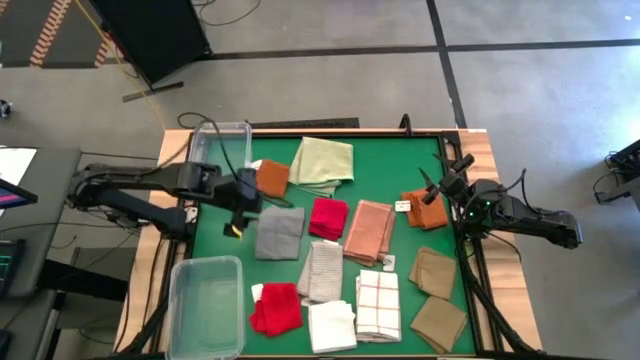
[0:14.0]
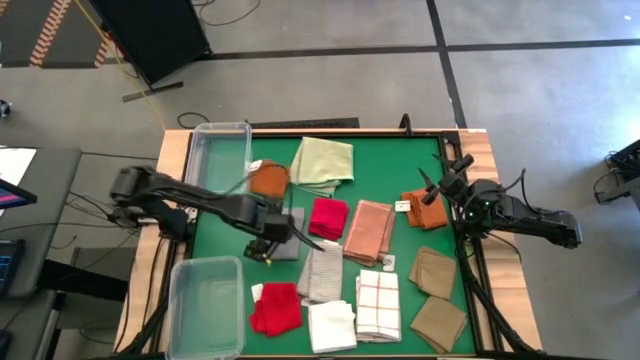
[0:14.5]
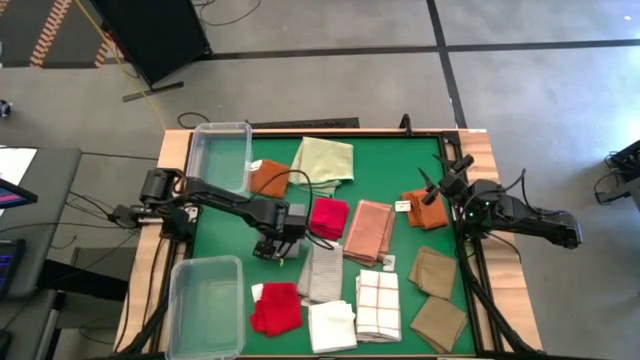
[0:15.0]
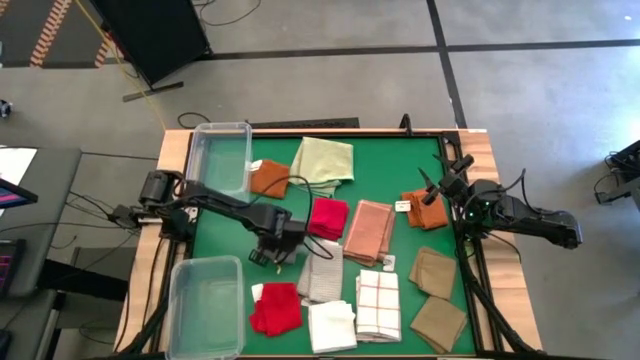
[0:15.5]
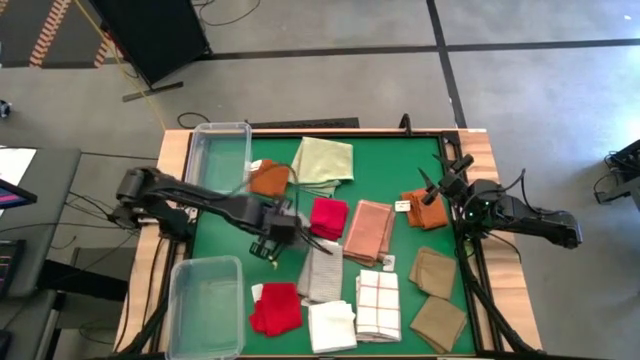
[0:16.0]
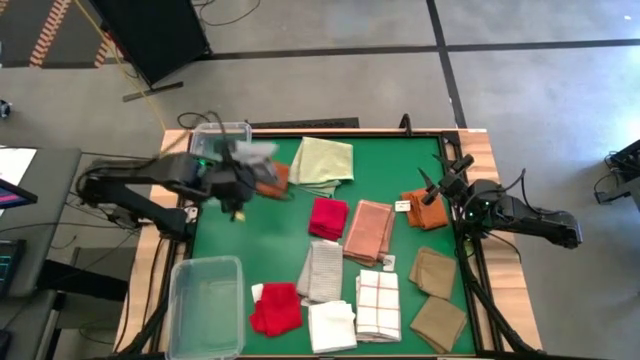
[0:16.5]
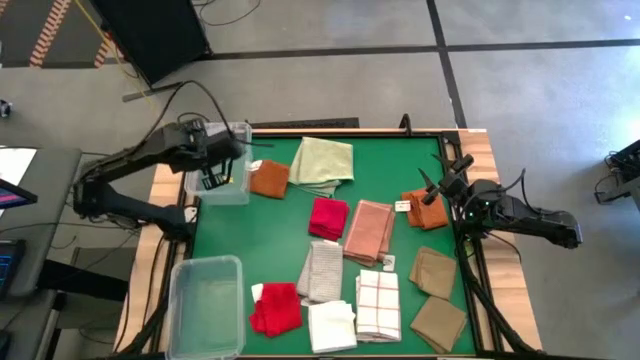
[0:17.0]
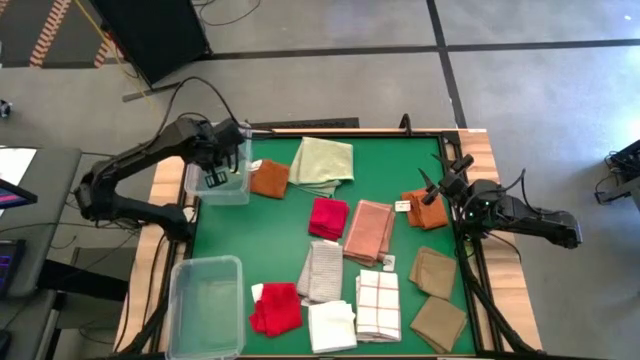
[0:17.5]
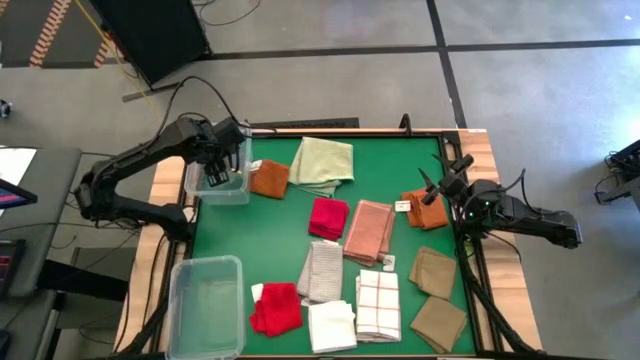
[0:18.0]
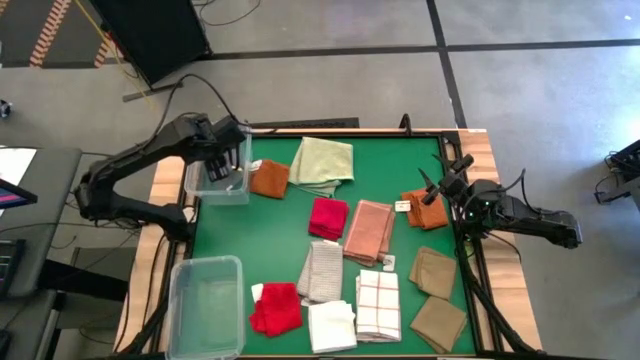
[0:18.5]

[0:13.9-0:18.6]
Task: Sort towels by color in basket
Put the gray towel into the top transparent bin

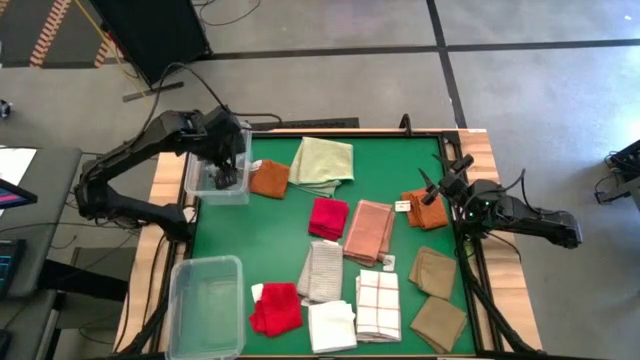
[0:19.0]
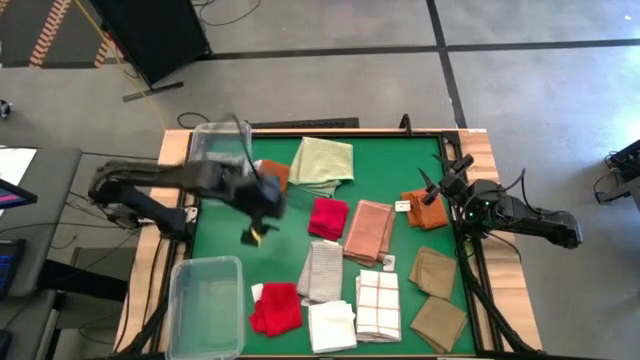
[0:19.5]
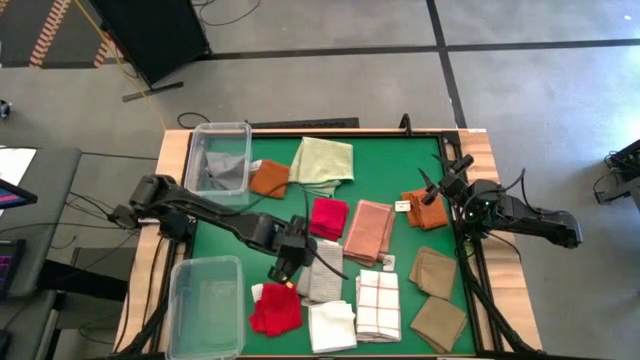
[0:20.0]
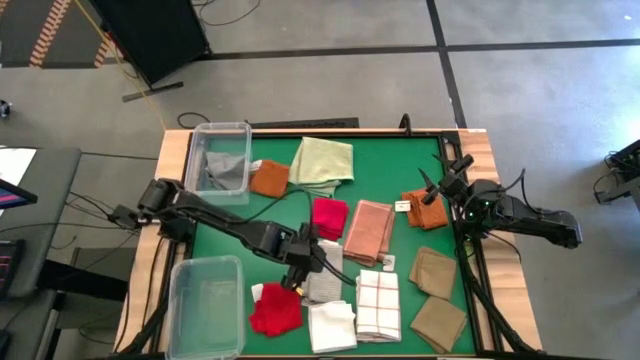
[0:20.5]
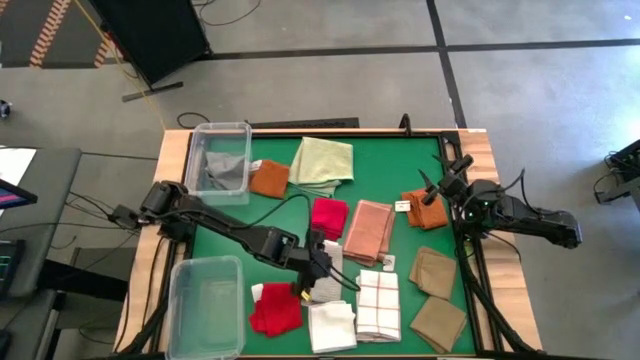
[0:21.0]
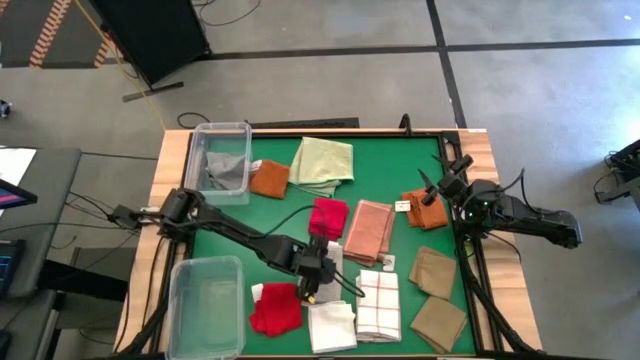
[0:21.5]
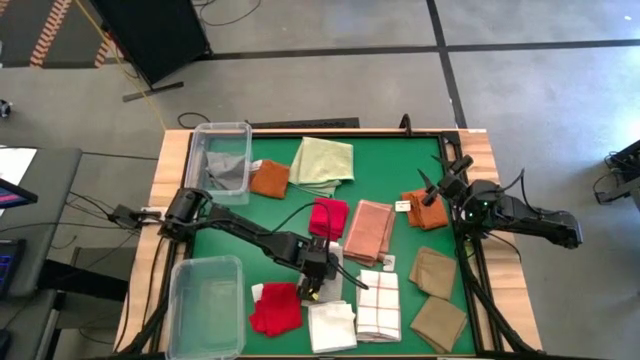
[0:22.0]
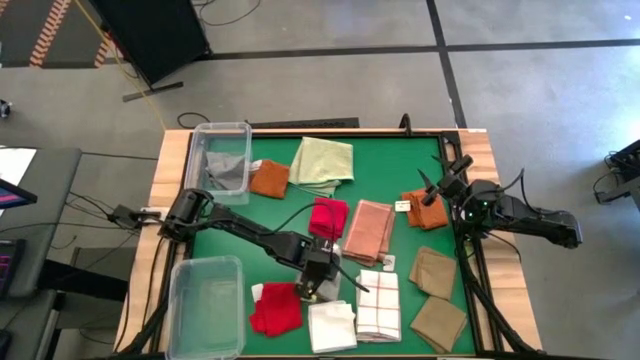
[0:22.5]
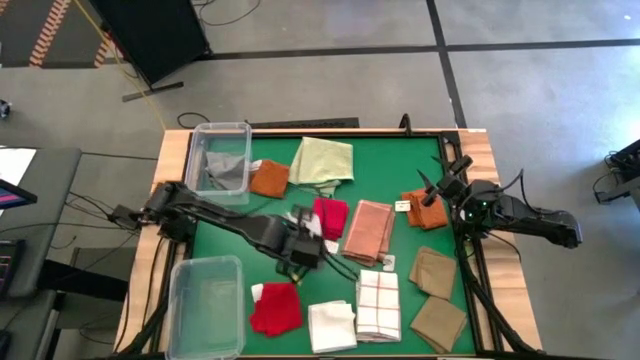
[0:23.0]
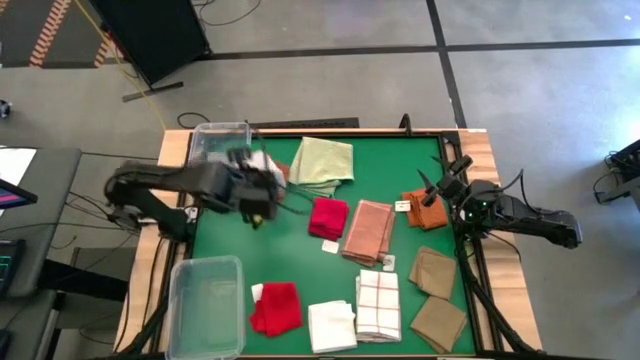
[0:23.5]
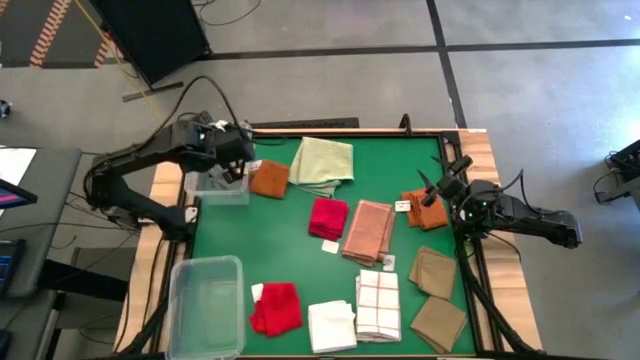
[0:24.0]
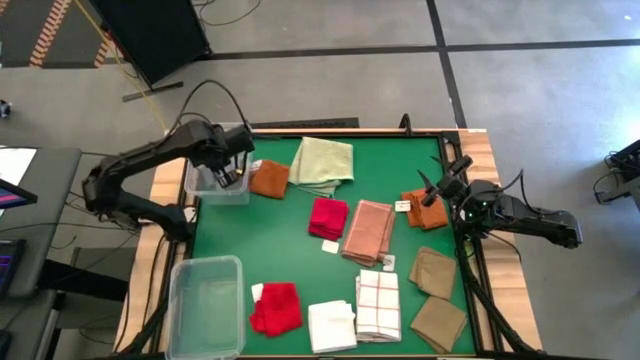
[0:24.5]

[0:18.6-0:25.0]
Put the gray patterned towel into the top transparent bin

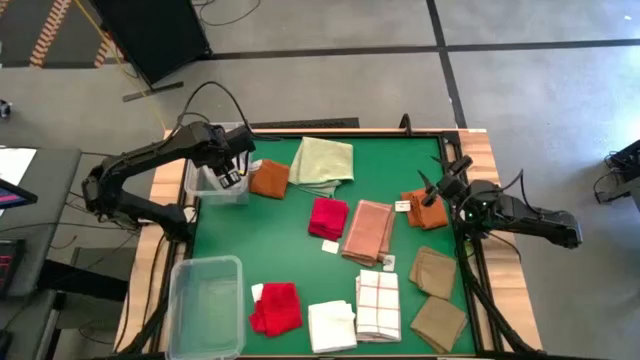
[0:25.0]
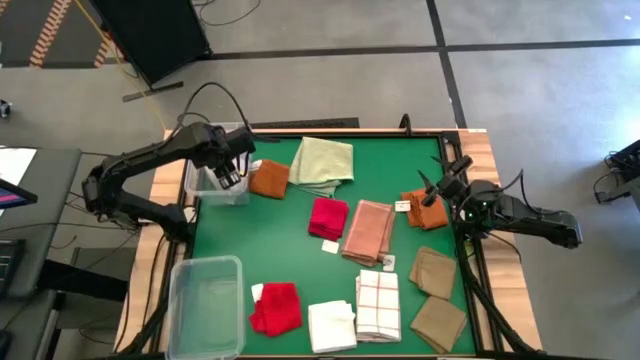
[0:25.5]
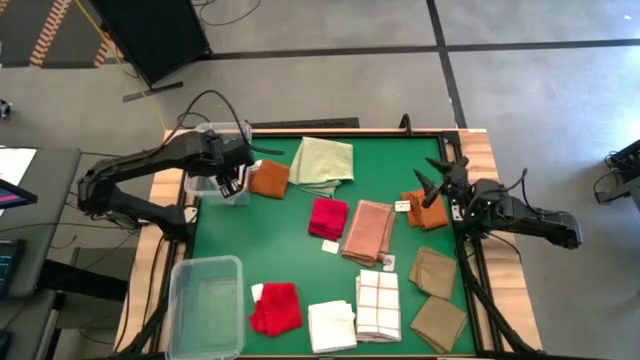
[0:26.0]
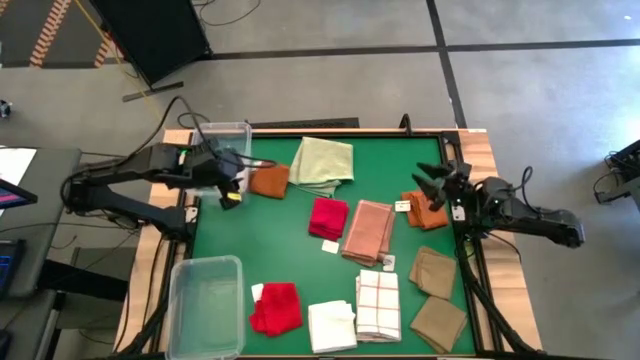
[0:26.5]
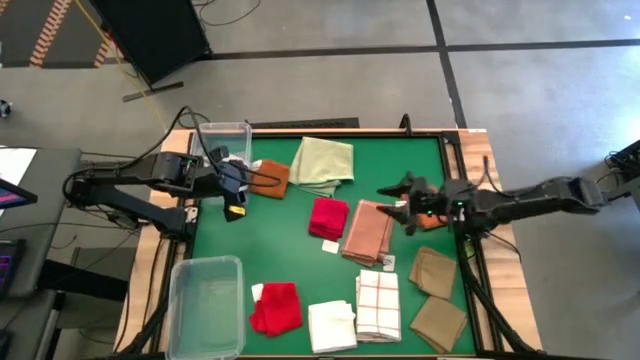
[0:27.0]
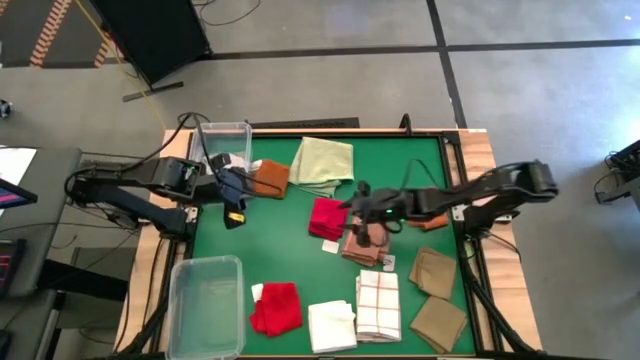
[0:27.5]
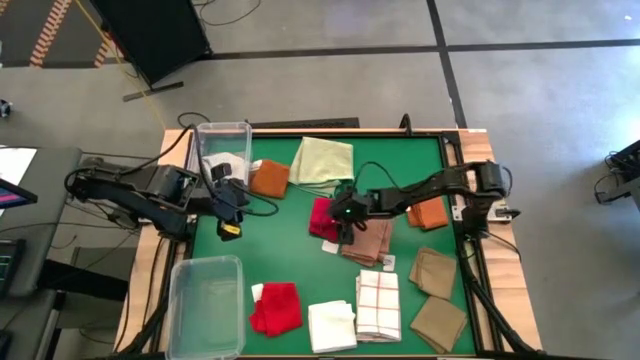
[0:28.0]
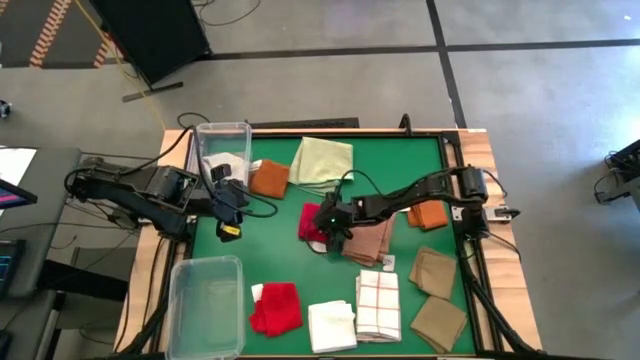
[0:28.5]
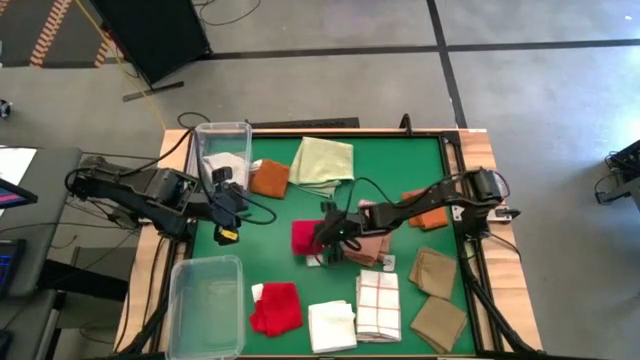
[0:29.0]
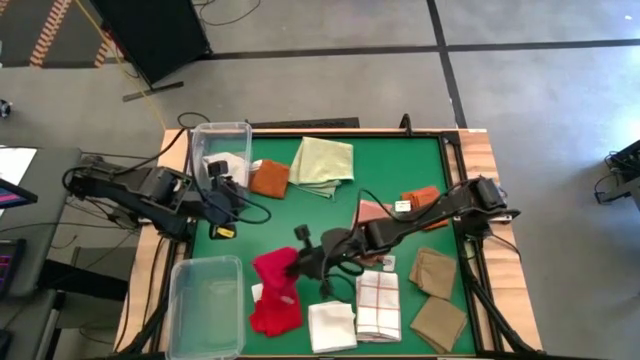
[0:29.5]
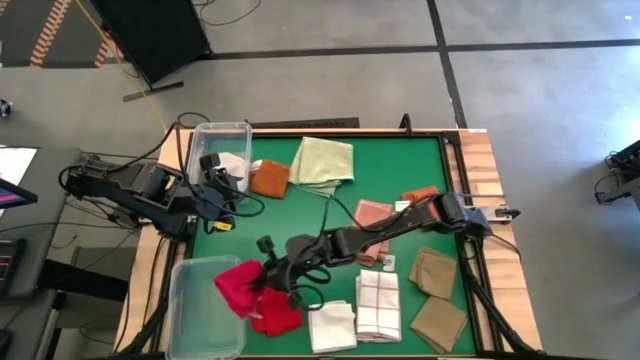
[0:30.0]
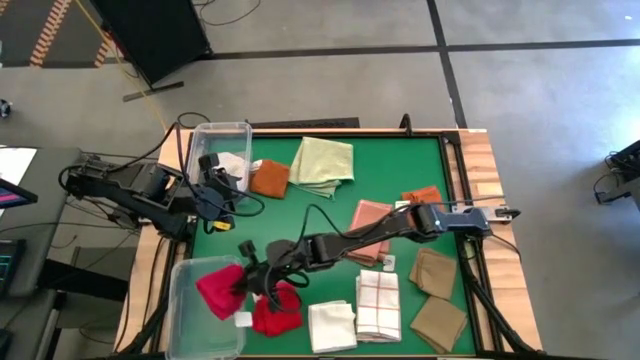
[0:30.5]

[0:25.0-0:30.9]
Put the right red towel into the bottom transparent bin

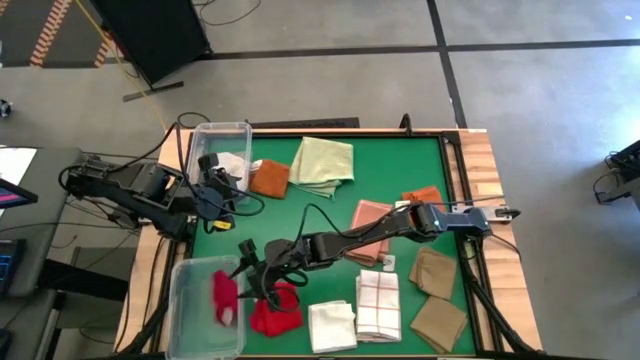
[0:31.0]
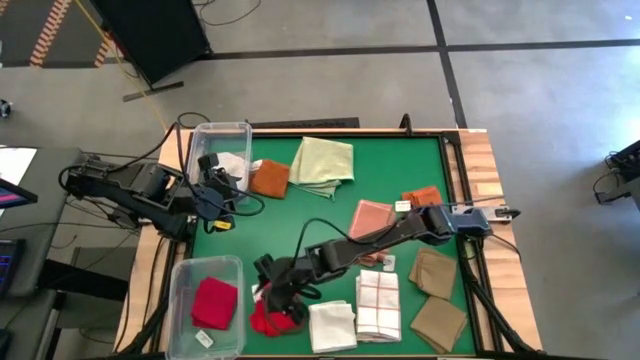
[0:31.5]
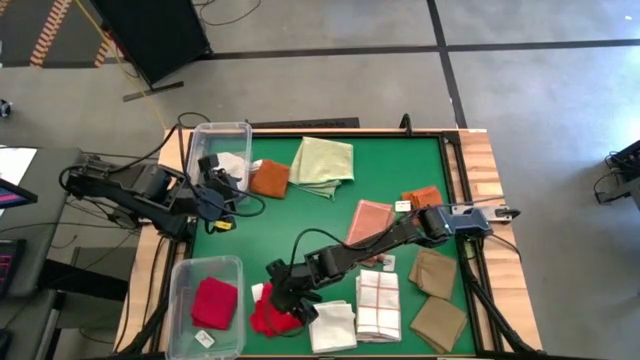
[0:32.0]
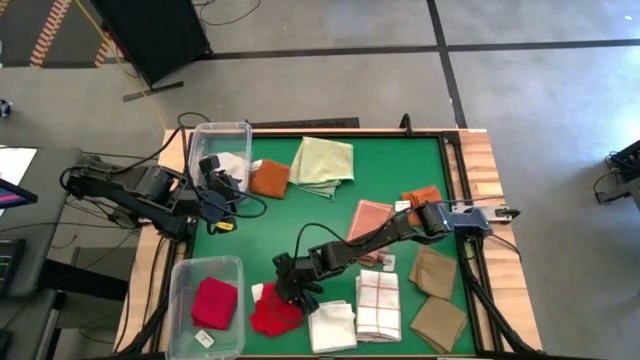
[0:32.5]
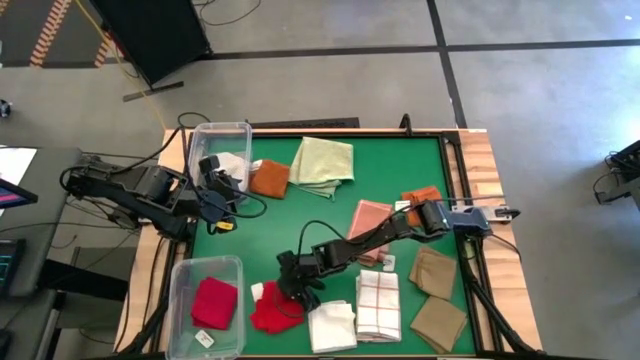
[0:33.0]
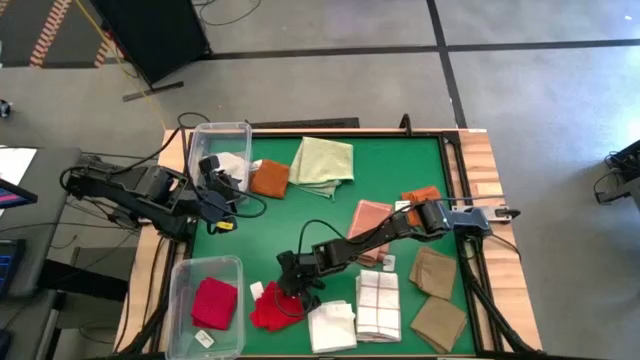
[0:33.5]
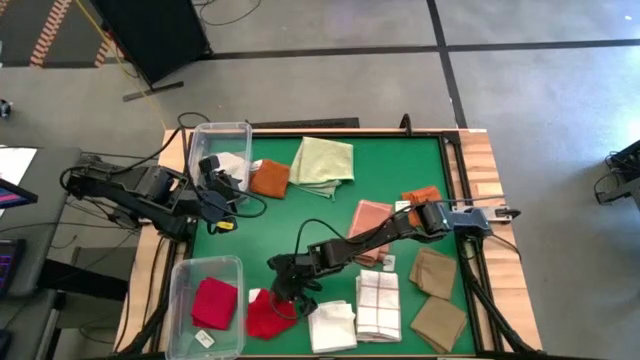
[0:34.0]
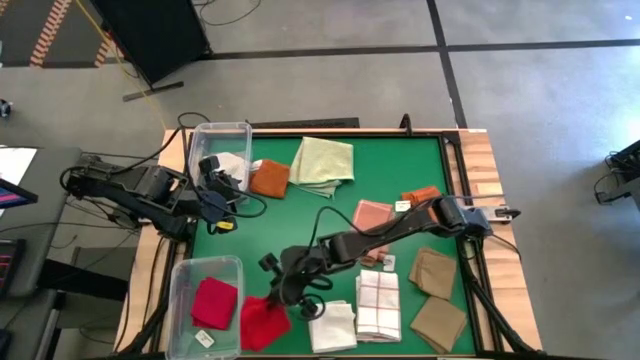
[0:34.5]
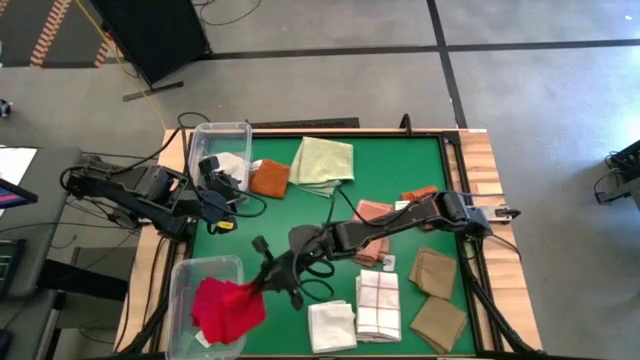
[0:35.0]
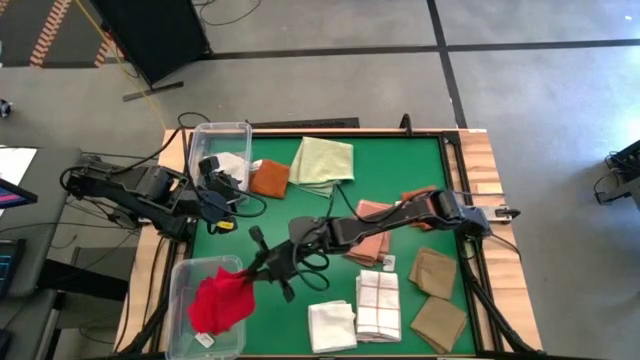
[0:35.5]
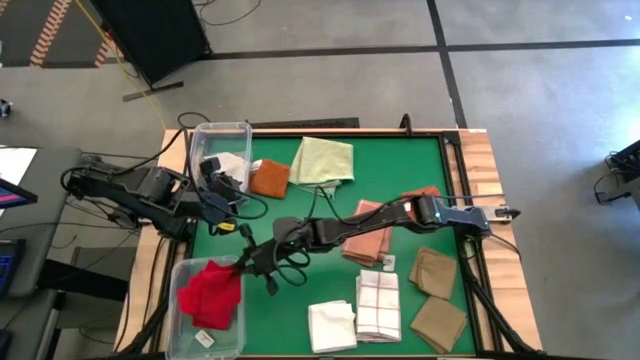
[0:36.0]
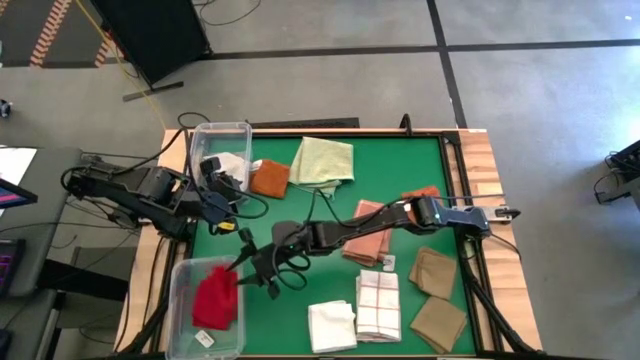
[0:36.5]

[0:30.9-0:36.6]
Put the red towel into the bottom transparent bin
